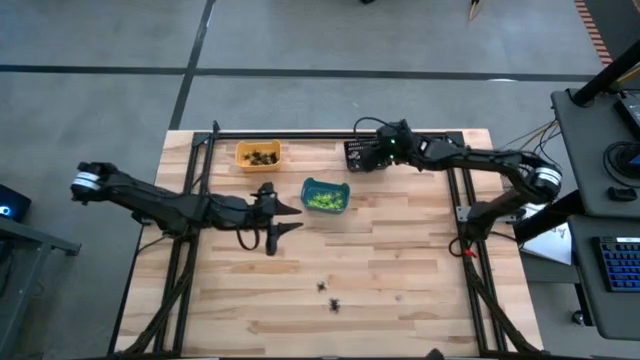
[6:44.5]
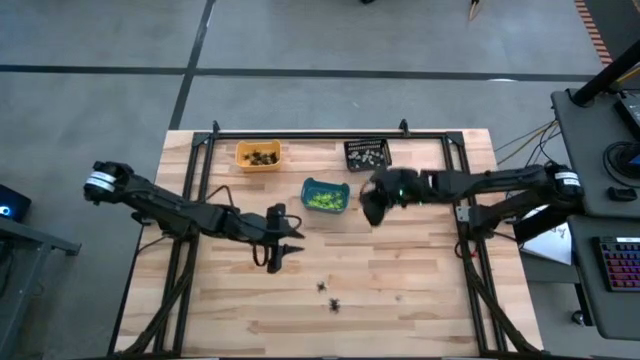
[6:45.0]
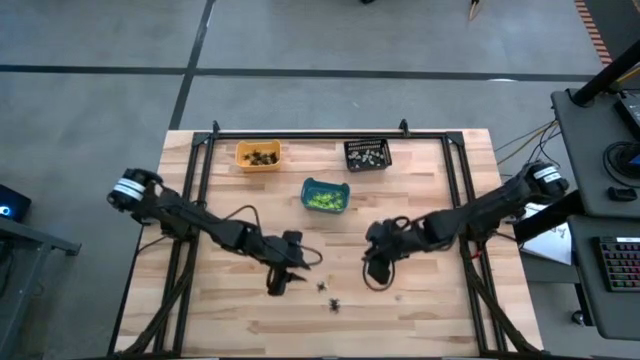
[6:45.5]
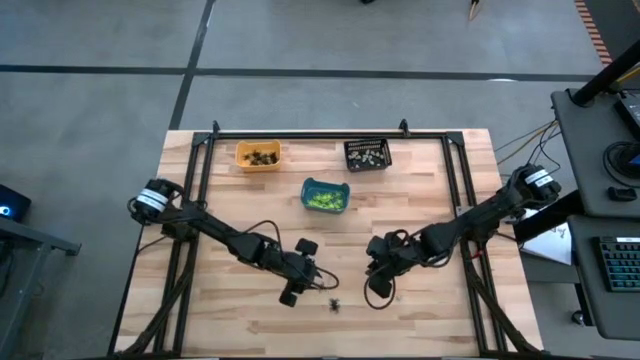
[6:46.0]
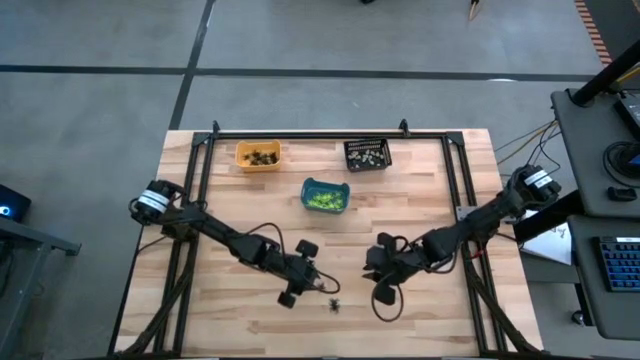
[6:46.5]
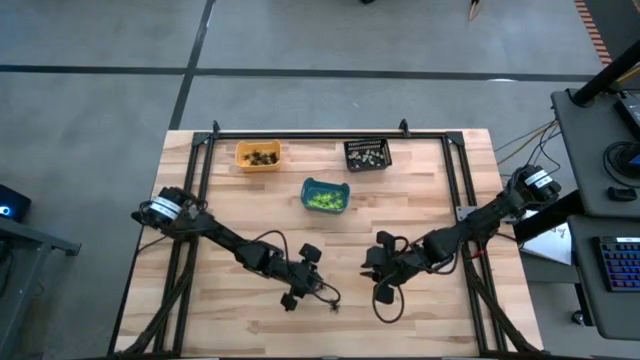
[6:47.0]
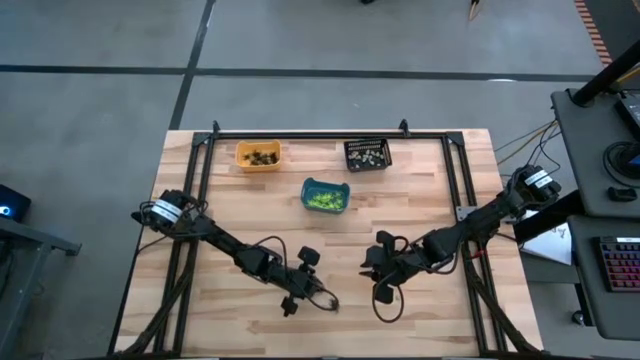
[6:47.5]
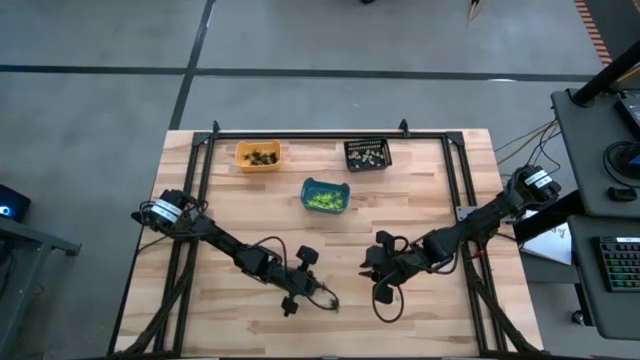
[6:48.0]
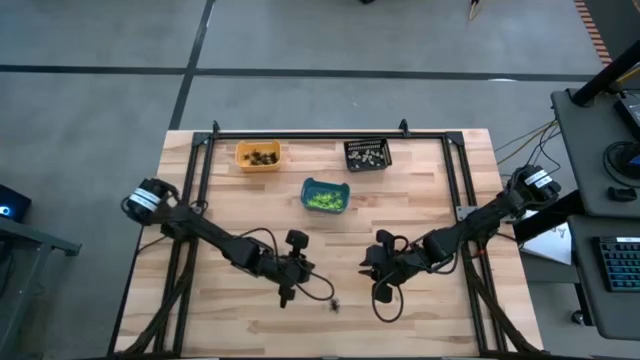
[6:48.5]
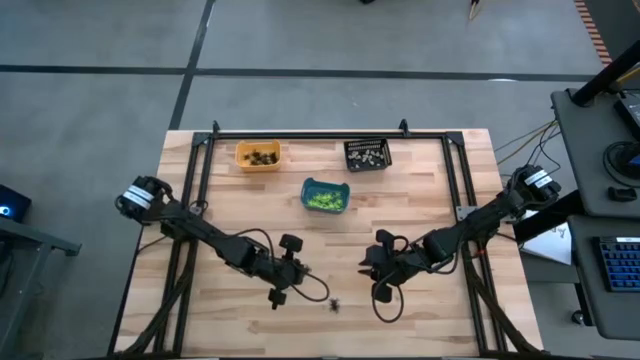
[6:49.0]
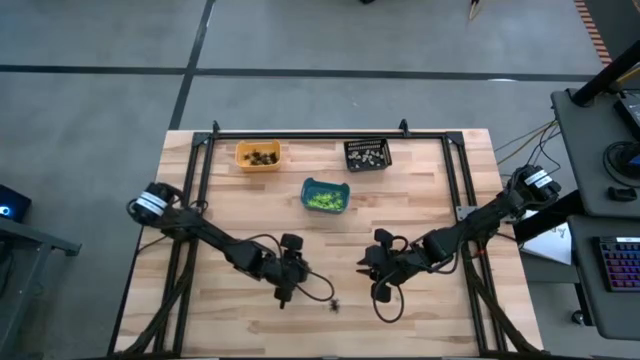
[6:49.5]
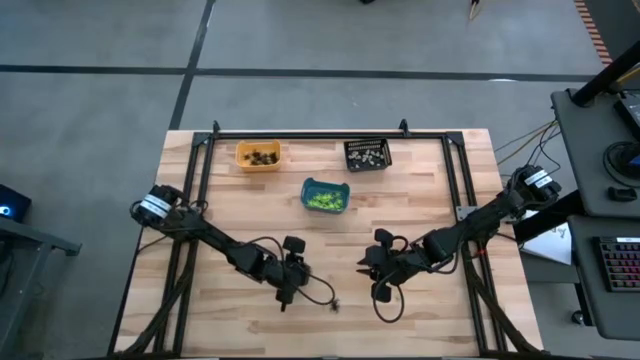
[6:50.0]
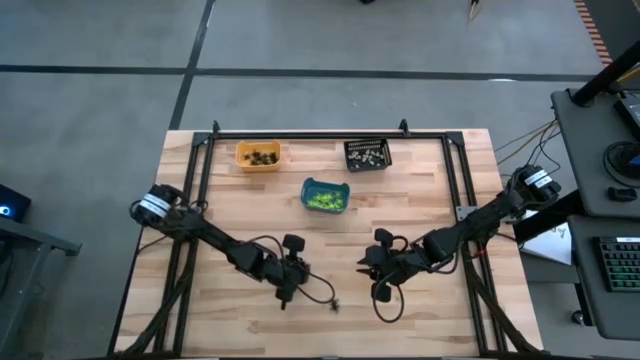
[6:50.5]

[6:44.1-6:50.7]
Task: Sort Halloween decoration
Put the black spider toy into the yellow bin

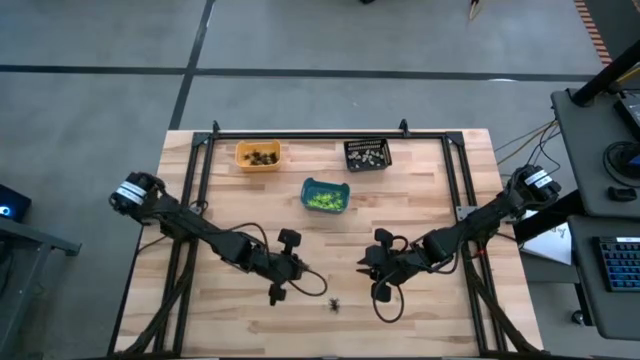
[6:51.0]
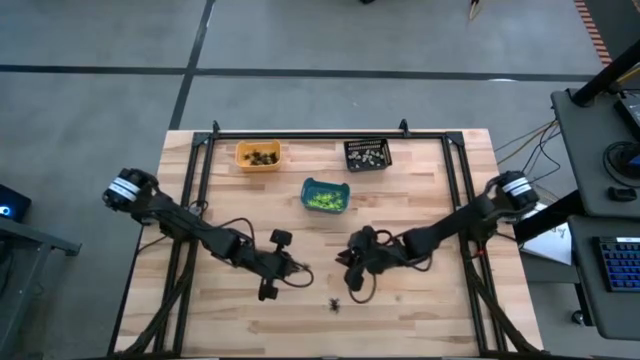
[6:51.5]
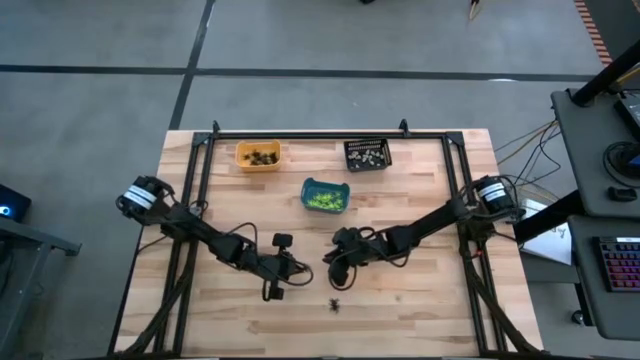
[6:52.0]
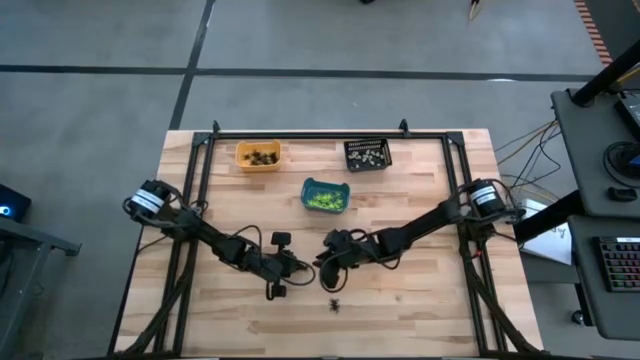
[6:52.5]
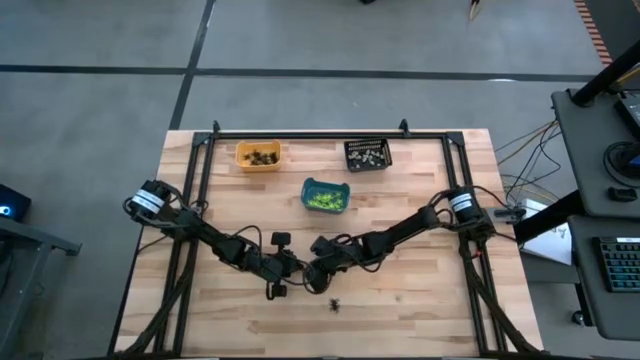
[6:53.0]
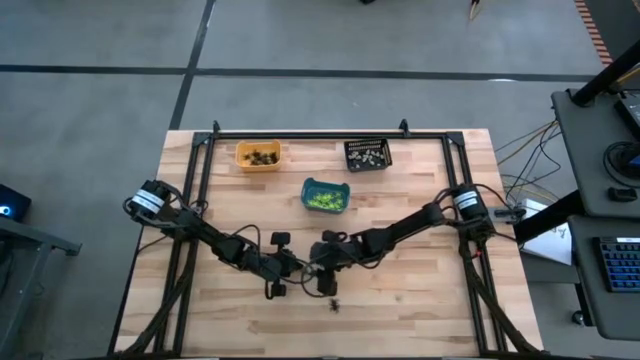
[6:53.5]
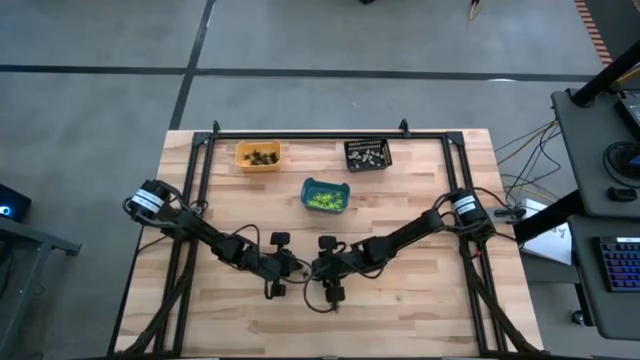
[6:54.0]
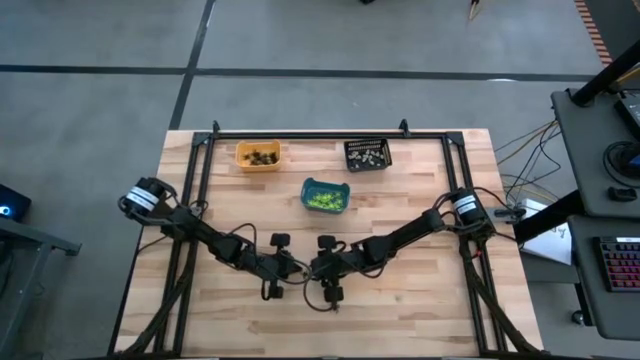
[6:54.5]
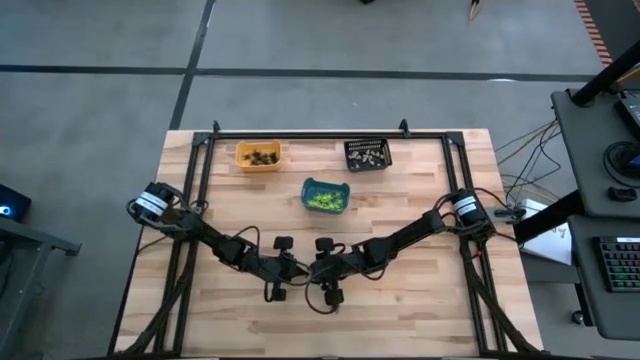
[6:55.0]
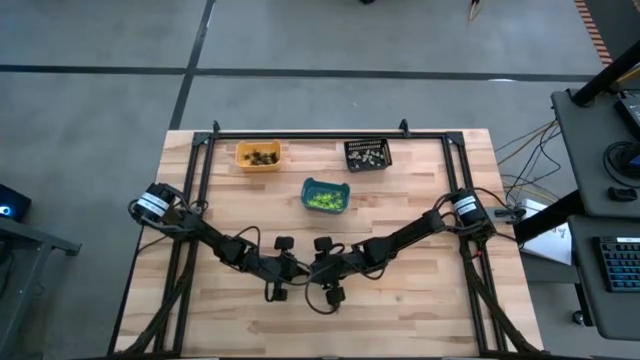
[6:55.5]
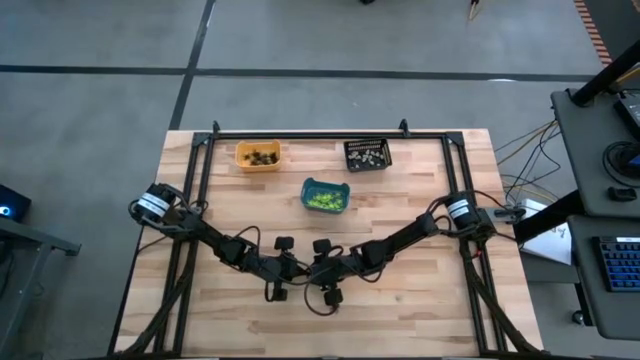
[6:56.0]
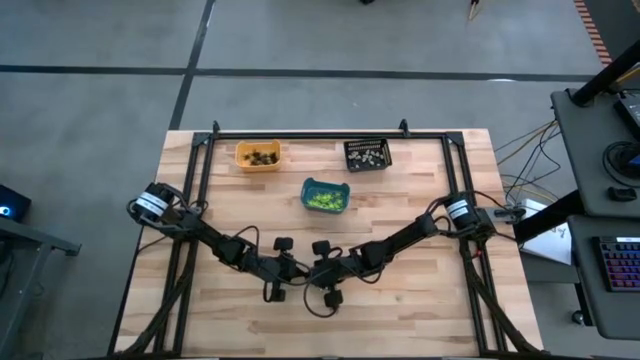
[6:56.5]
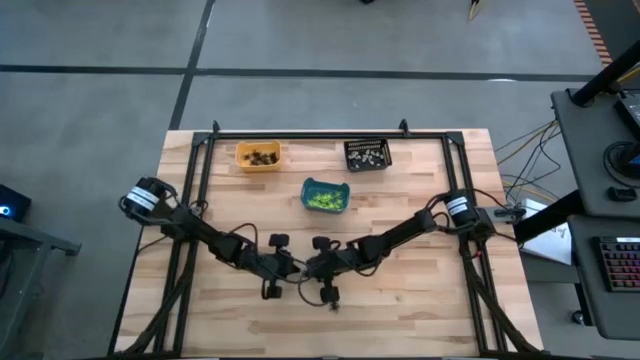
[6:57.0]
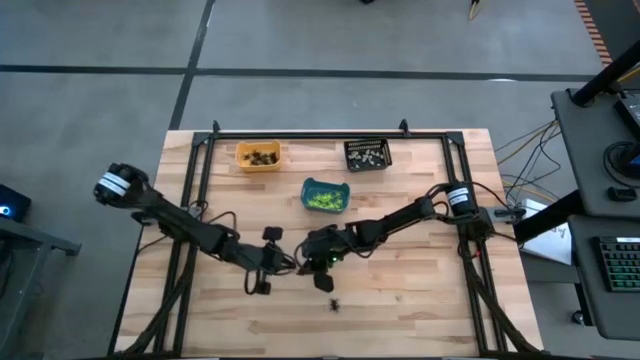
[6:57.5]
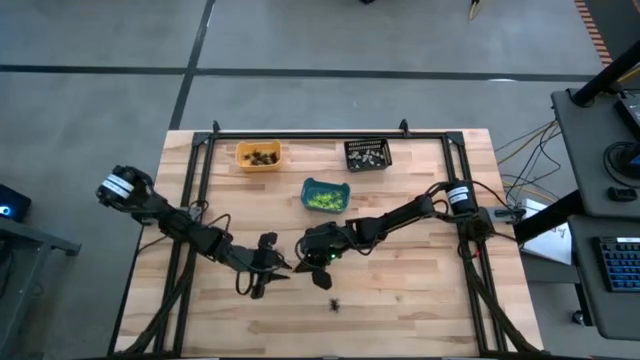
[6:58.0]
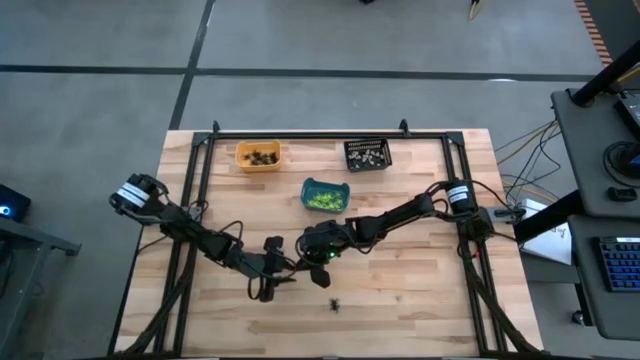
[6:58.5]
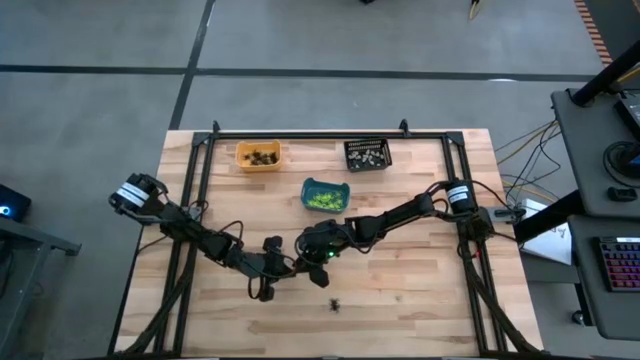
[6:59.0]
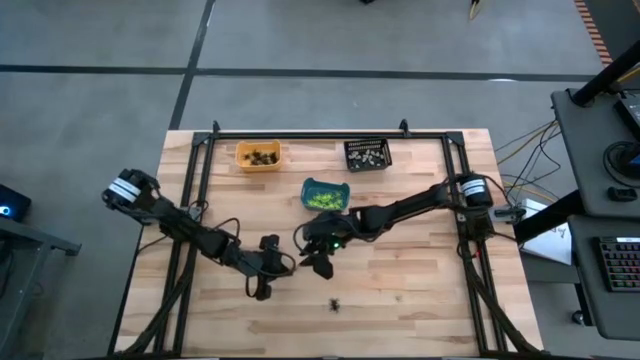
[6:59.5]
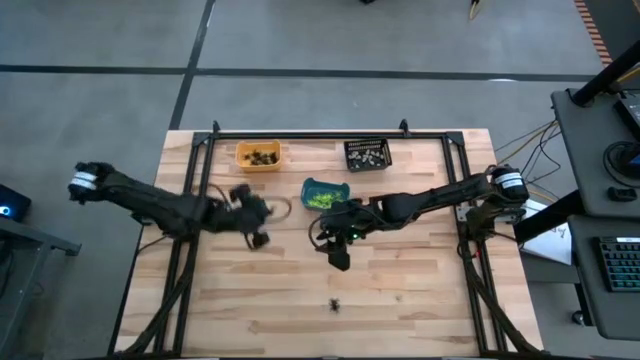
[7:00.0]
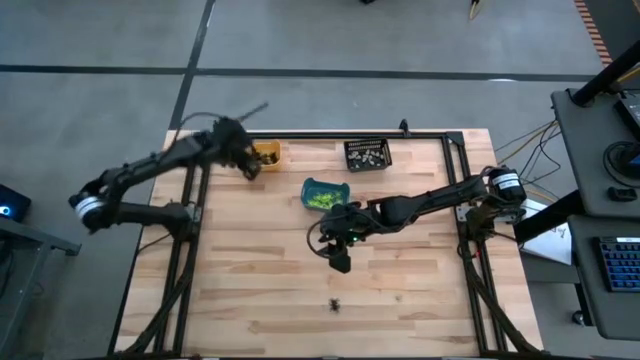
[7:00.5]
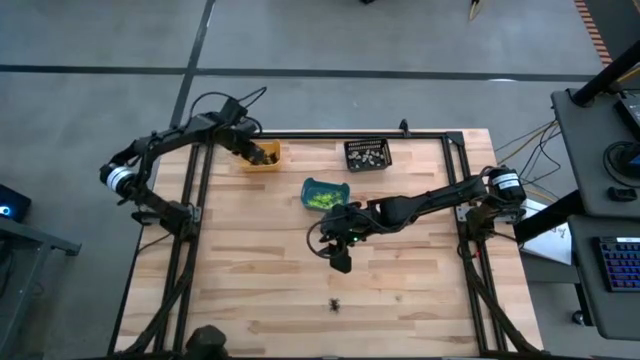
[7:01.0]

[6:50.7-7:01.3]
Put the black spider toy into the yellow bin

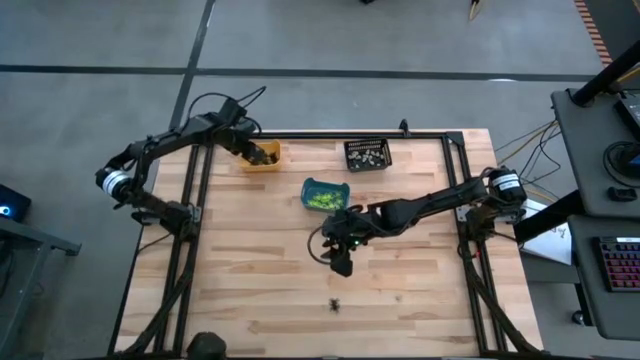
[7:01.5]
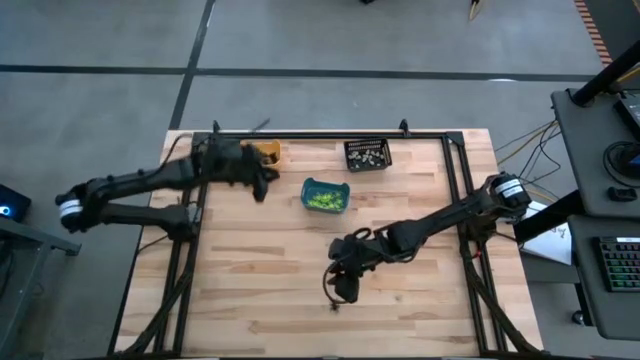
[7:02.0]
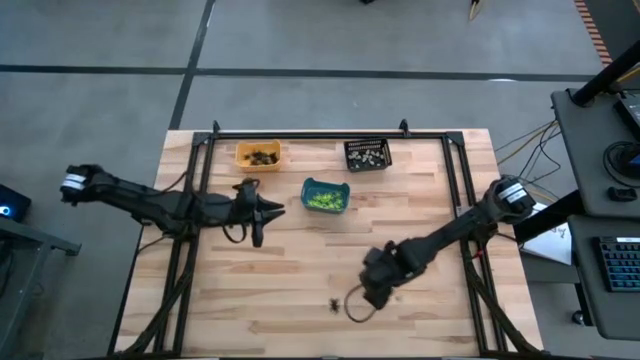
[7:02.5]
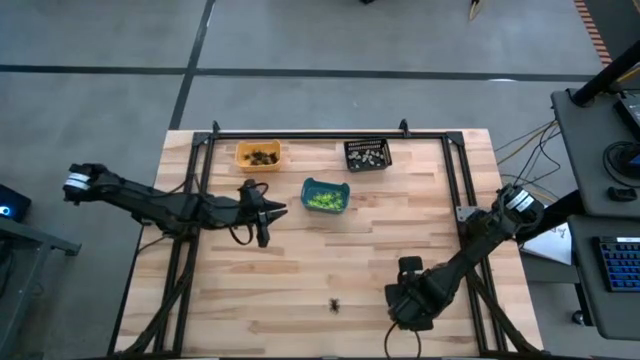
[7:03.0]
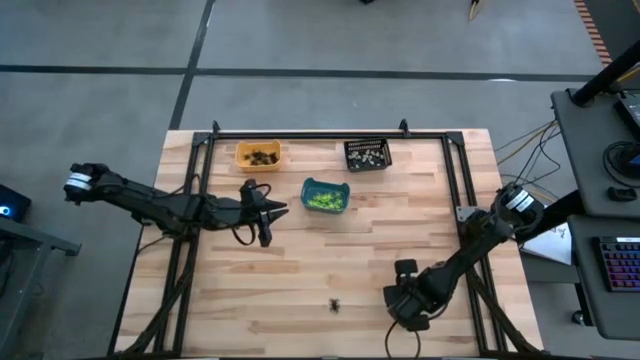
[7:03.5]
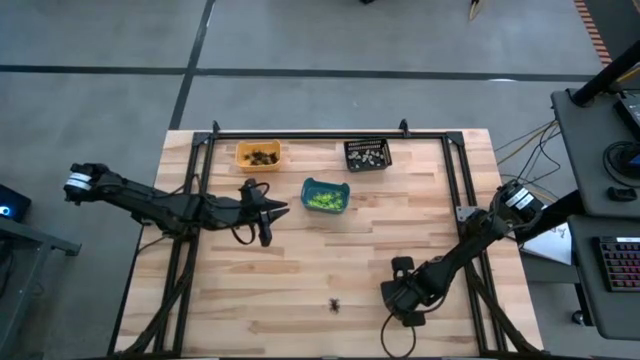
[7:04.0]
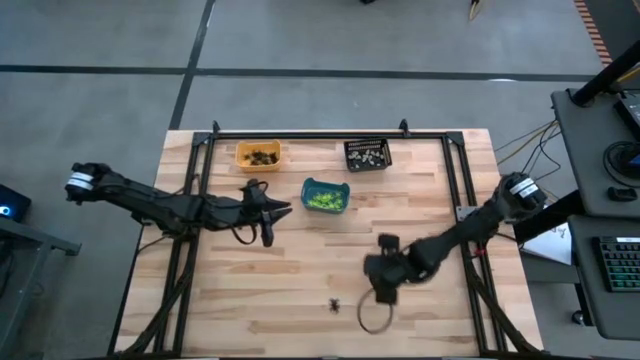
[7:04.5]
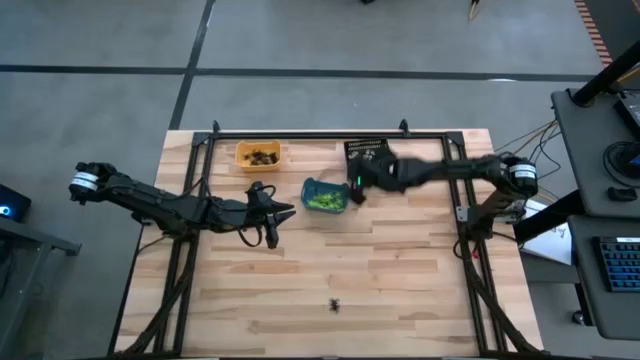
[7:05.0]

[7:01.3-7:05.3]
Put the white skull toy into the black bin
